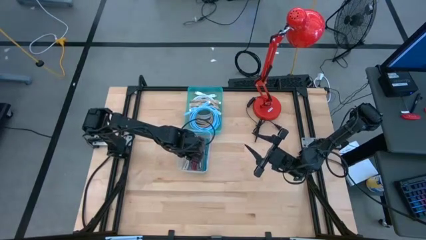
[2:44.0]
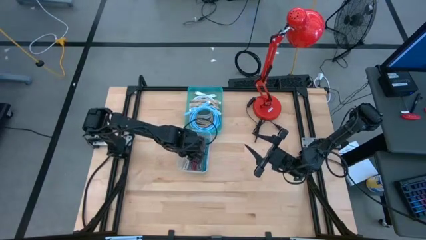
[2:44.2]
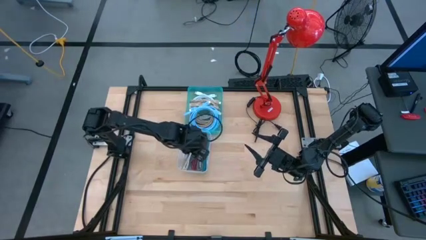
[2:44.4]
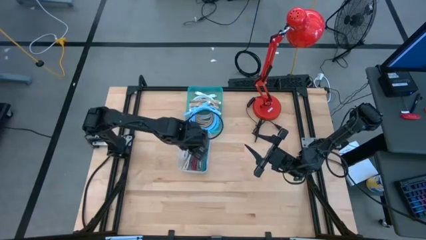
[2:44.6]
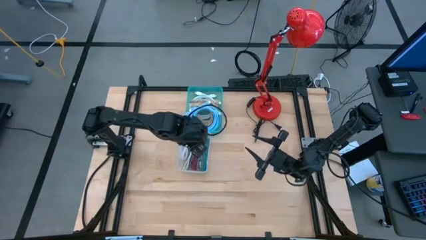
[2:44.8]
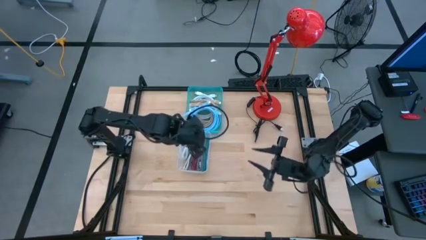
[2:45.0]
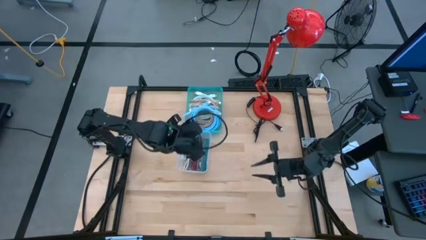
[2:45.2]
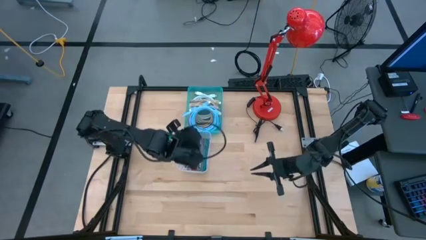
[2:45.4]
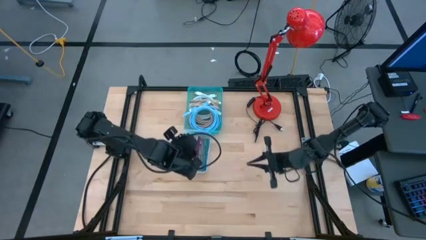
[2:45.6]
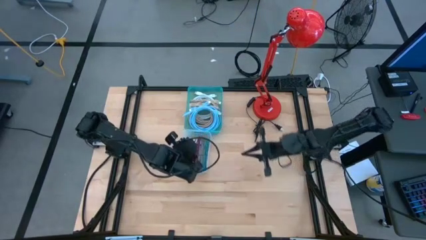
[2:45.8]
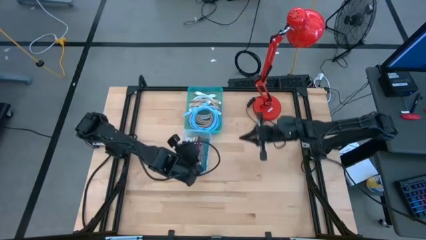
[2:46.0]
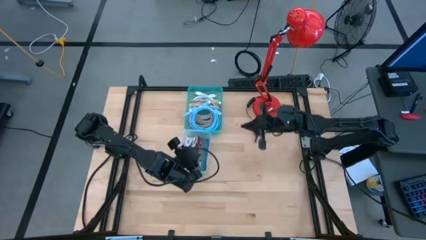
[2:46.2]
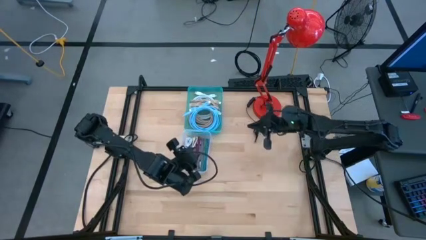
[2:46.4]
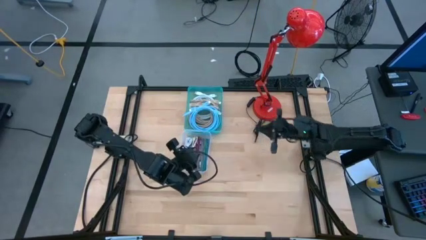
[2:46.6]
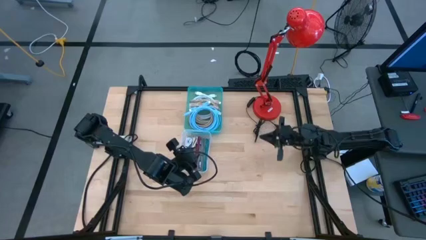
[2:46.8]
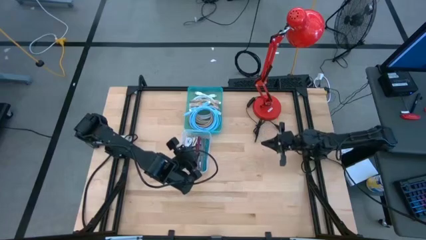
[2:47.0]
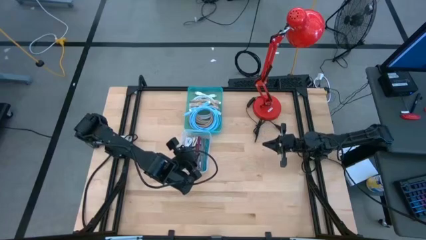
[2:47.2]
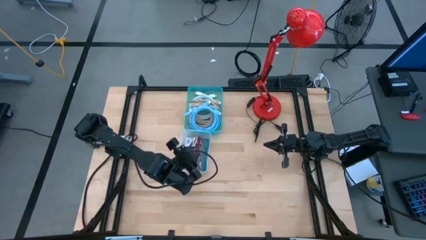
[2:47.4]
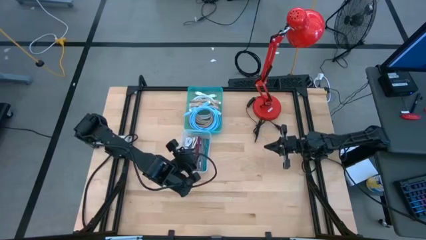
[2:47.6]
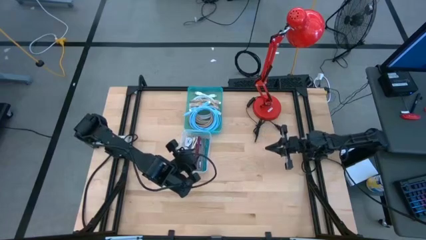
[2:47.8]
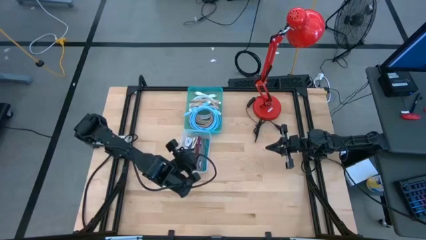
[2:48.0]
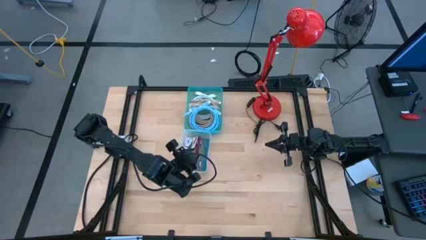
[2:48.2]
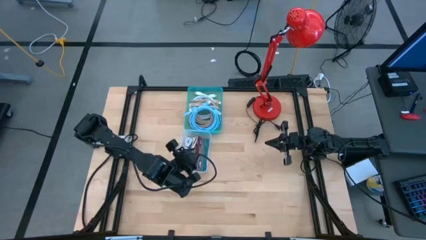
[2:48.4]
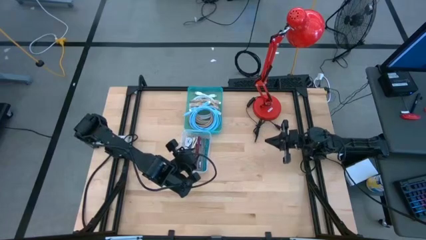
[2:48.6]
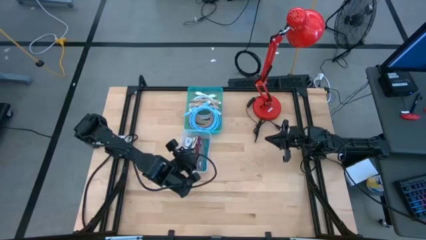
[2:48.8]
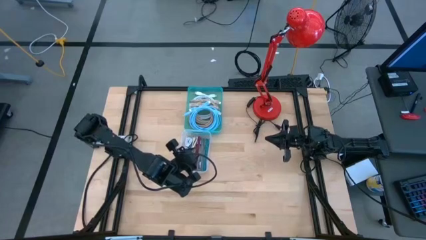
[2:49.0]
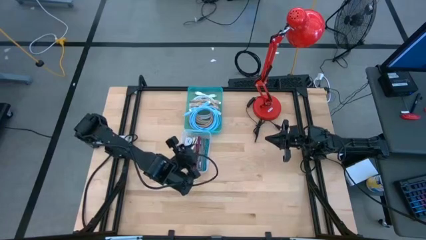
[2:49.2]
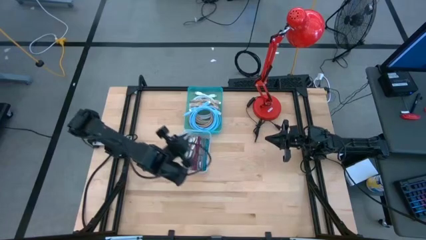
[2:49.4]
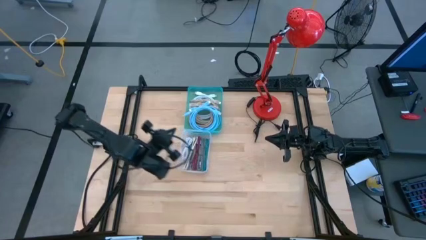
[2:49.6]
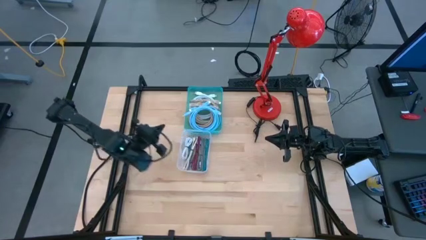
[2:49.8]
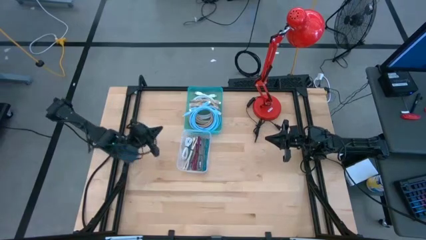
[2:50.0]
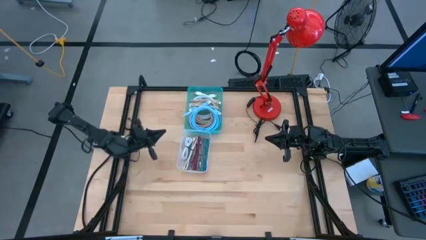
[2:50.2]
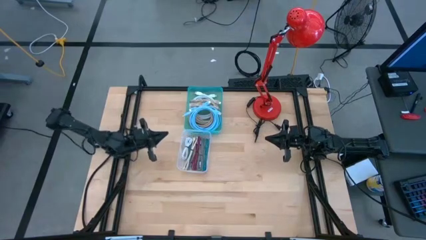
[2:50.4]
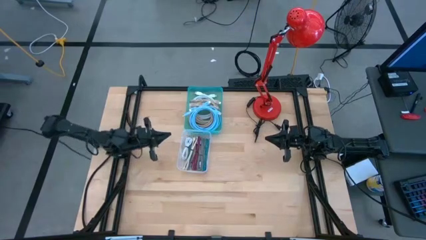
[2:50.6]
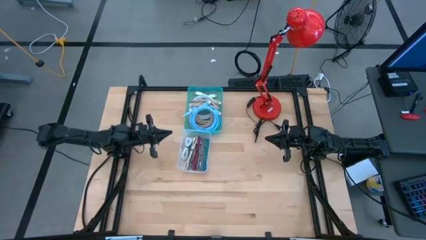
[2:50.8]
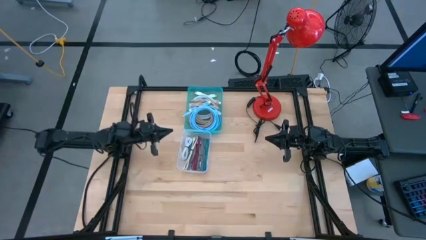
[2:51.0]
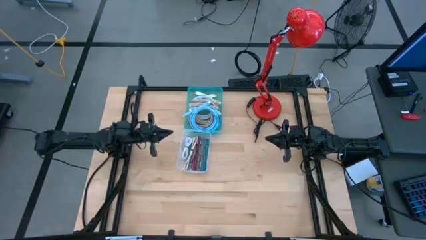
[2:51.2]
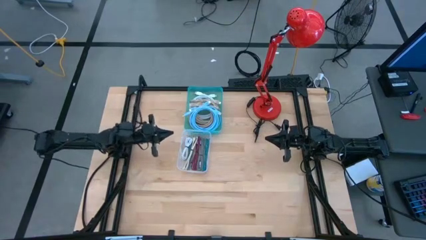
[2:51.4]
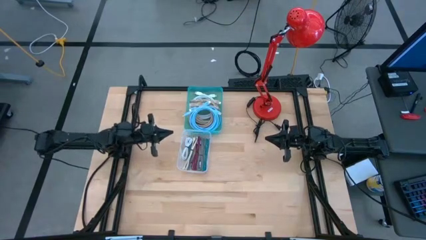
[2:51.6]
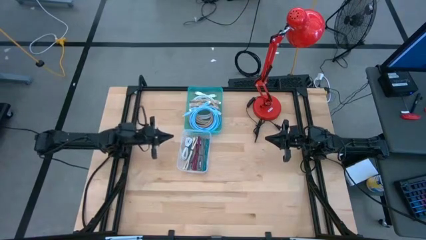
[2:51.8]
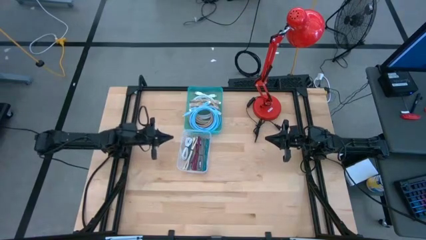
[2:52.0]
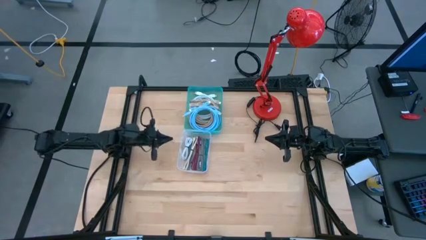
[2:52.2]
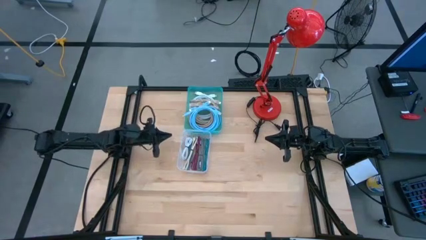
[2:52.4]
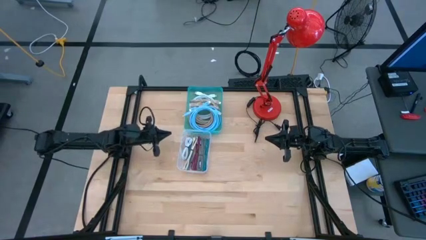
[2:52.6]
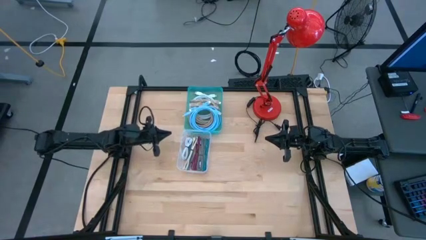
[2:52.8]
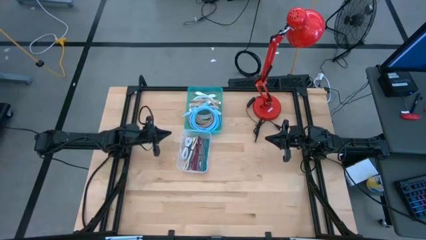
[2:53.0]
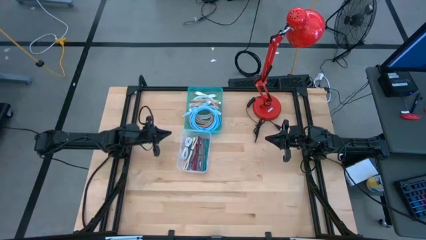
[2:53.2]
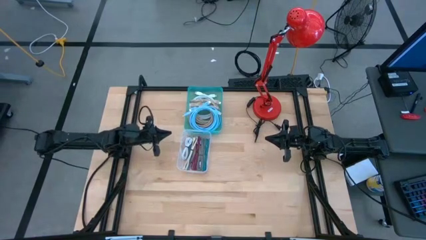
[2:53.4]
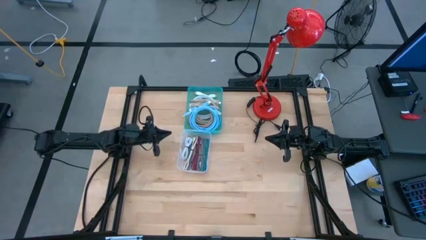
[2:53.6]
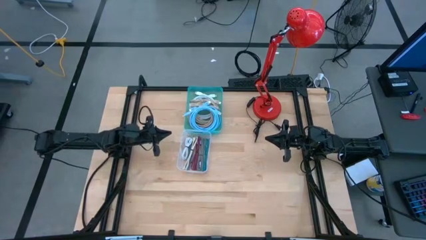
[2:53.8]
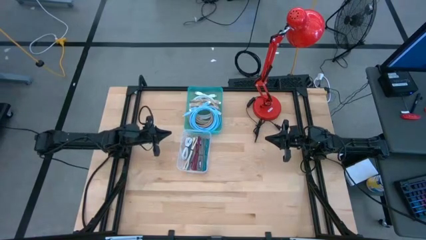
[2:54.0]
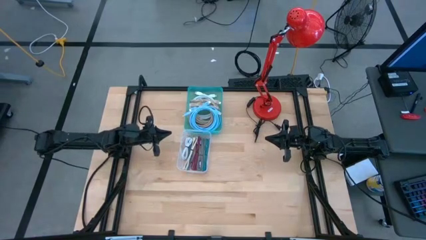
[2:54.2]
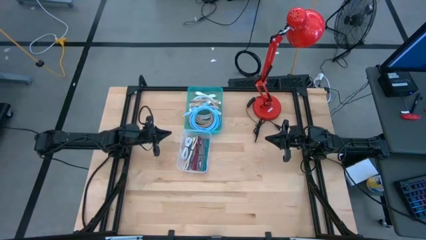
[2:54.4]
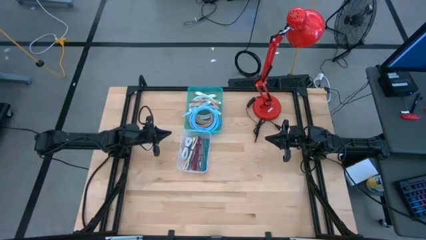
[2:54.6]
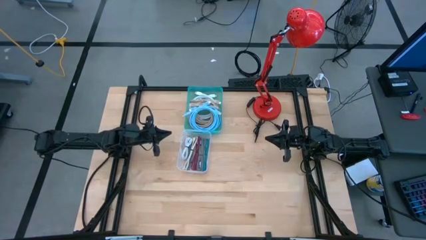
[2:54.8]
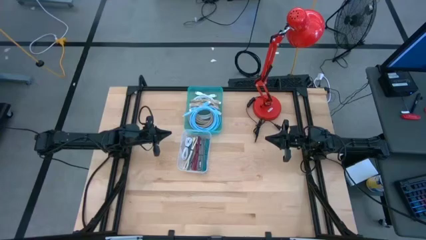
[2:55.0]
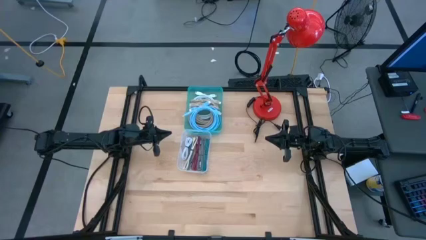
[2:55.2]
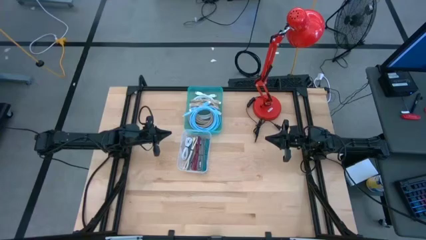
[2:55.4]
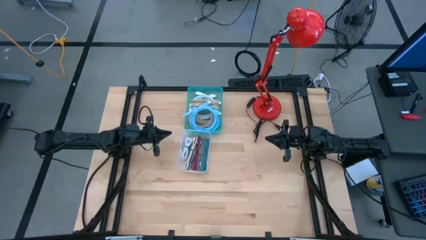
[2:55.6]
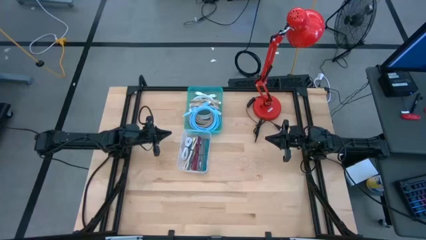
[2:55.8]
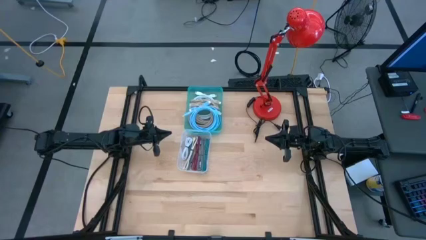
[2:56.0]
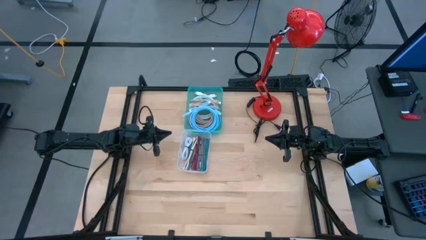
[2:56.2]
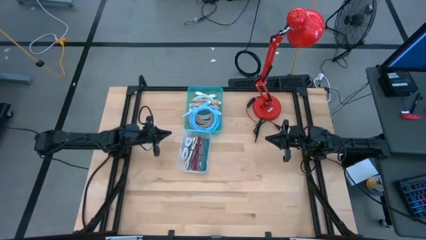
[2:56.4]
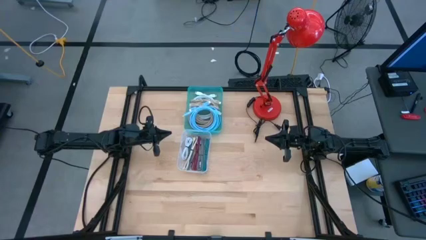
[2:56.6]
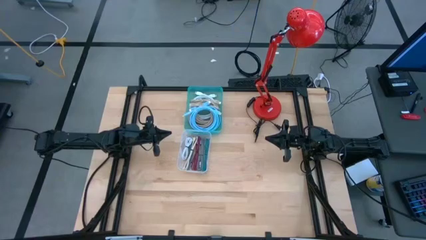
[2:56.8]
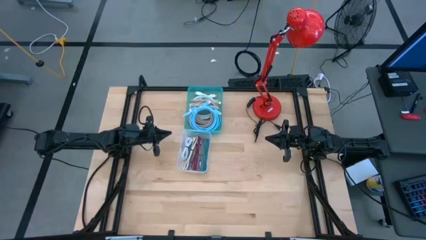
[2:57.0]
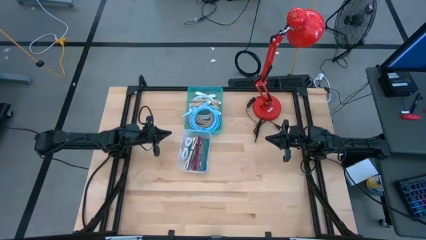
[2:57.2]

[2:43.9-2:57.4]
Task: Pick & Place USB Port
Return to Home Position

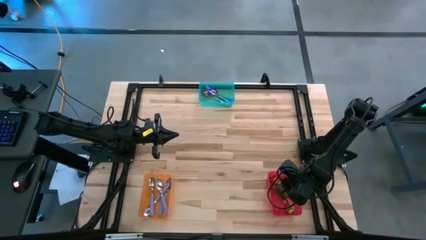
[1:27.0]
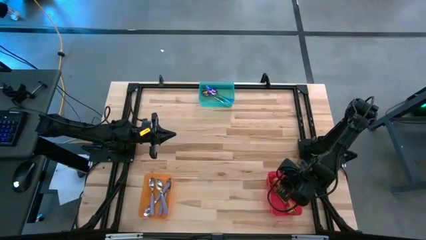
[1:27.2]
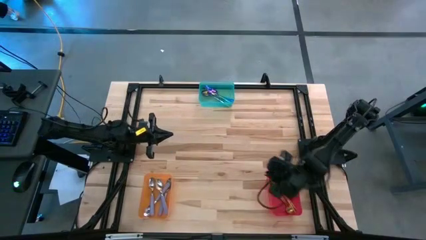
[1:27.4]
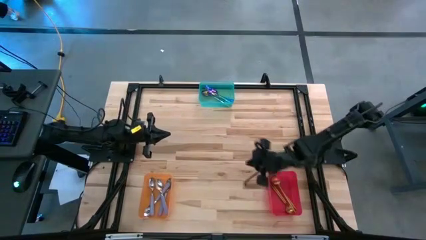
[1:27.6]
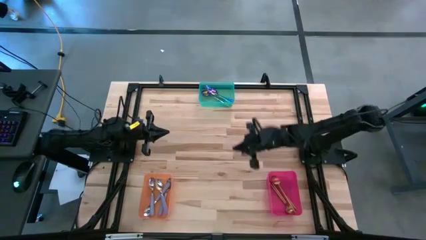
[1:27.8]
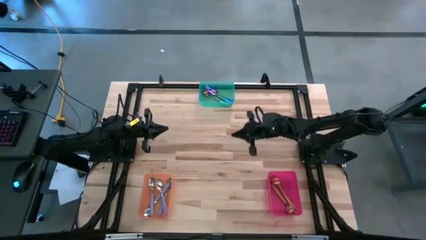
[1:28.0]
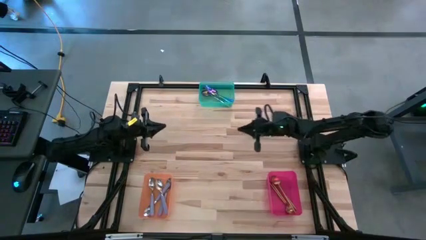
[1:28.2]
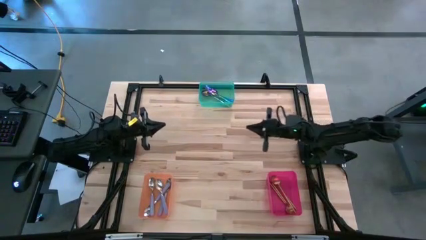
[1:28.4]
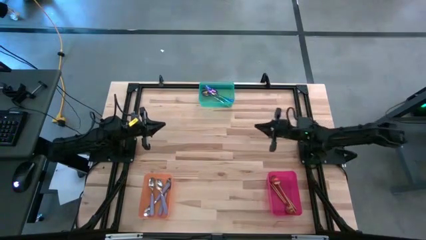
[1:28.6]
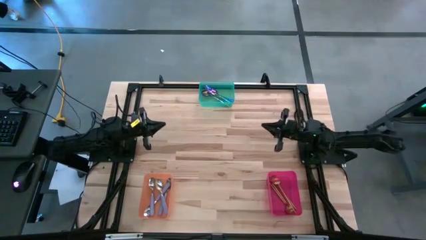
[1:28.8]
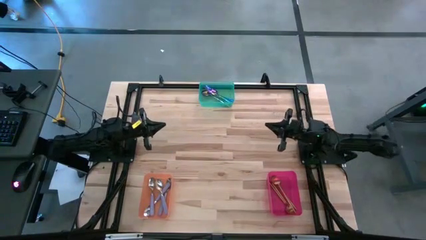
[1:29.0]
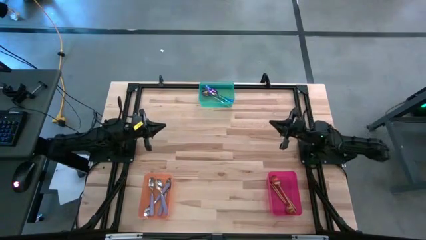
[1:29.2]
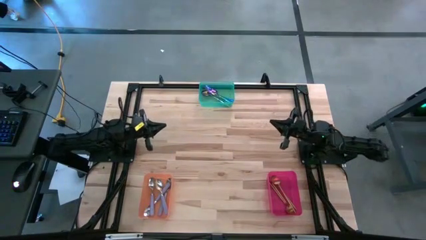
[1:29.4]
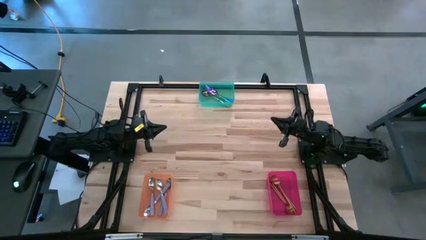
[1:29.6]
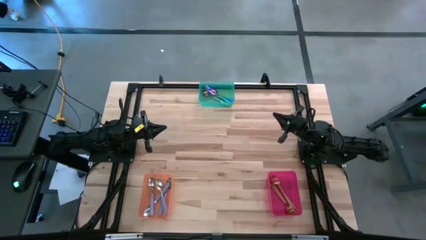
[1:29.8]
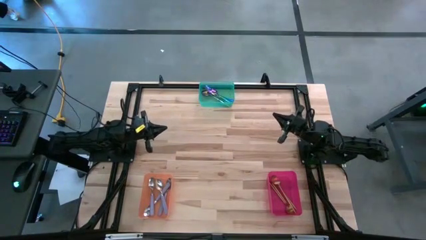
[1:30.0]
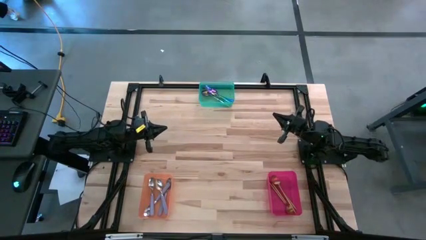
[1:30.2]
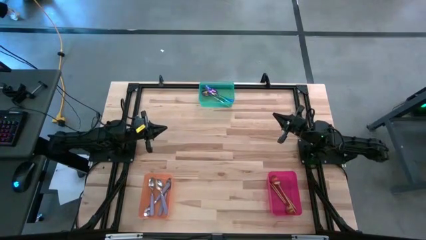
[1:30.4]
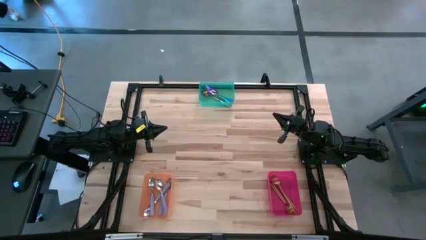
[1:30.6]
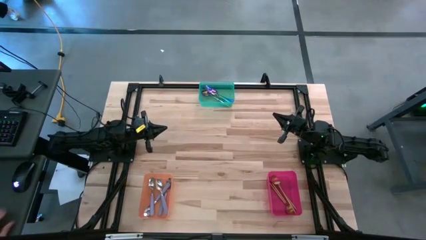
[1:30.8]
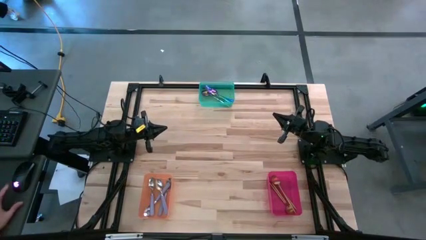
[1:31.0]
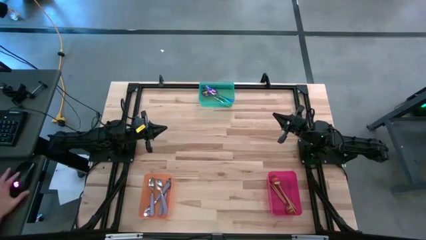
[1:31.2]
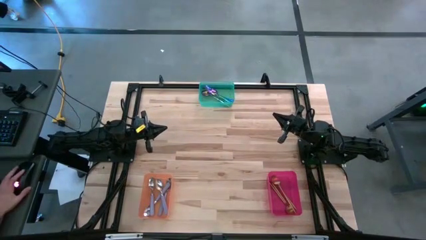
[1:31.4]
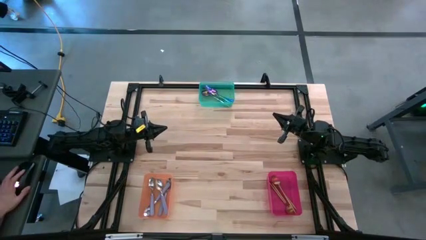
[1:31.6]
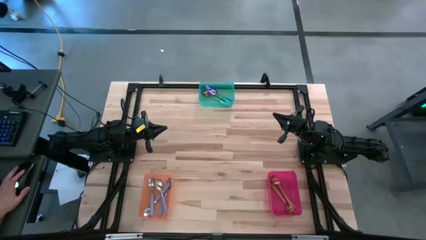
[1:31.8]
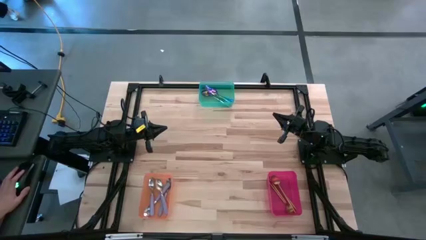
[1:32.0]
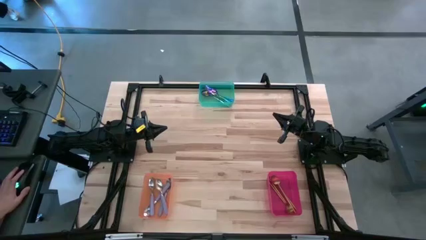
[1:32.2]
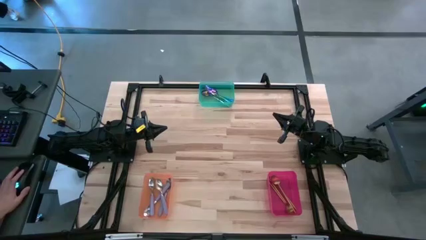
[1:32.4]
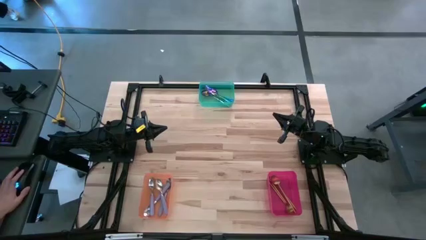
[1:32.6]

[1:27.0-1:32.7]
Task: Sort silverware by color (type)
Return to Home Position
